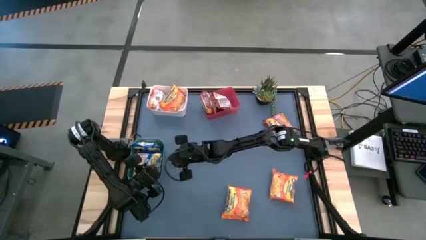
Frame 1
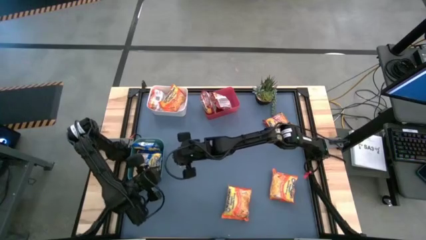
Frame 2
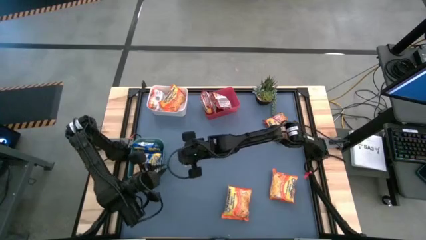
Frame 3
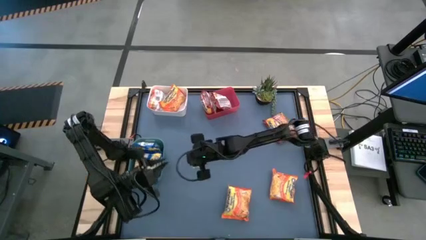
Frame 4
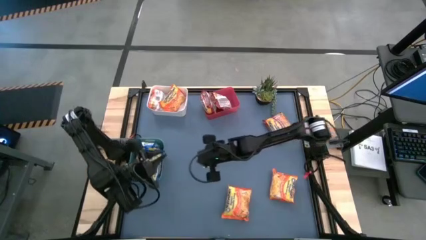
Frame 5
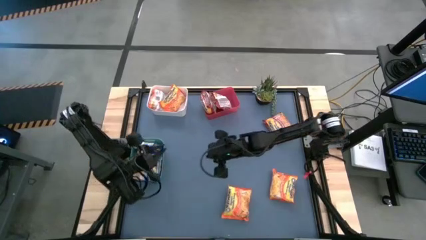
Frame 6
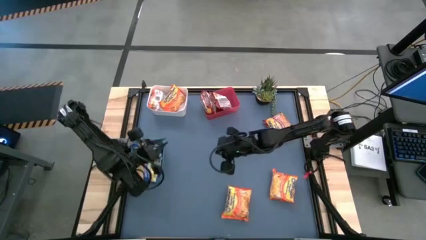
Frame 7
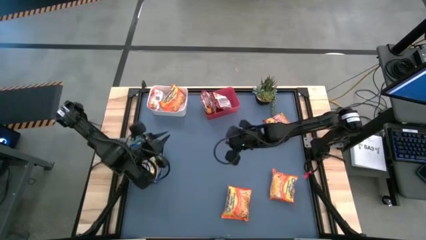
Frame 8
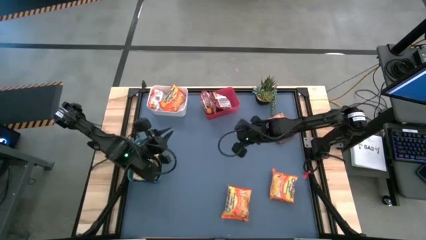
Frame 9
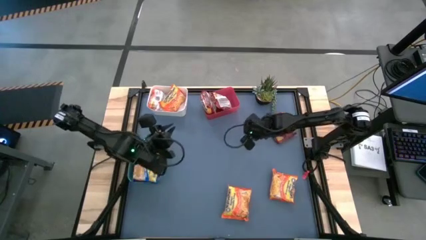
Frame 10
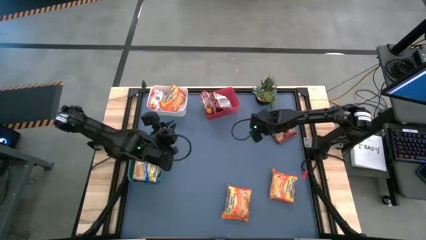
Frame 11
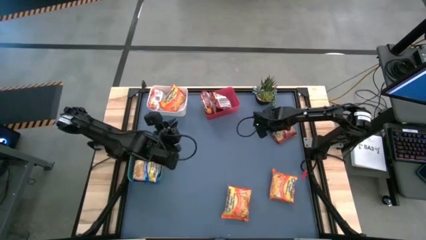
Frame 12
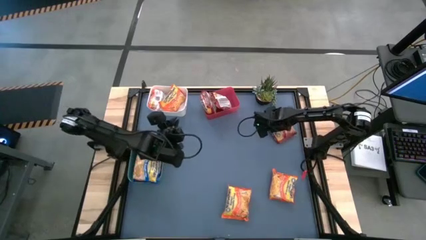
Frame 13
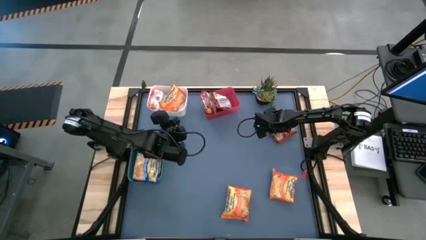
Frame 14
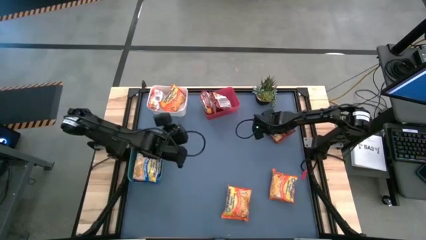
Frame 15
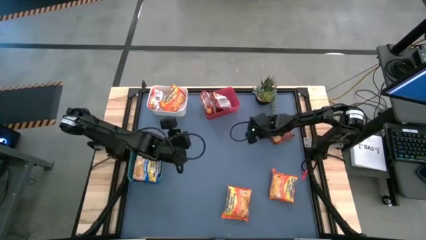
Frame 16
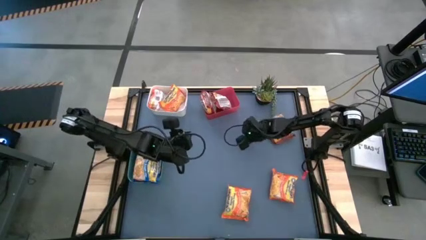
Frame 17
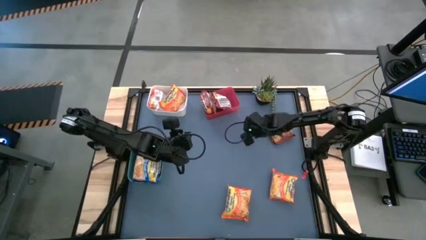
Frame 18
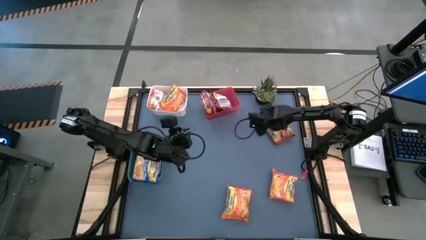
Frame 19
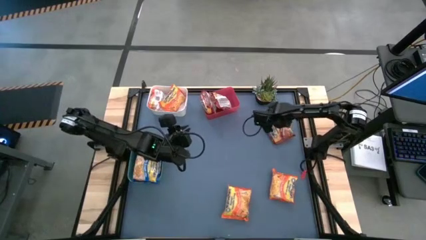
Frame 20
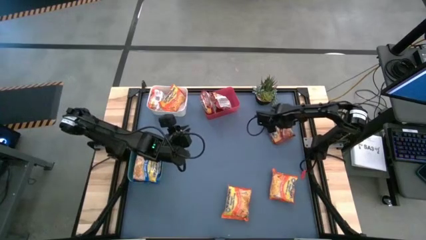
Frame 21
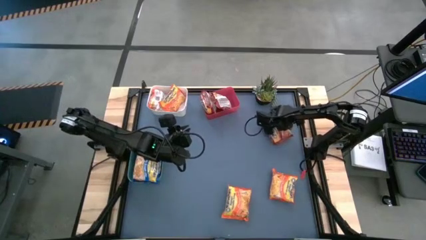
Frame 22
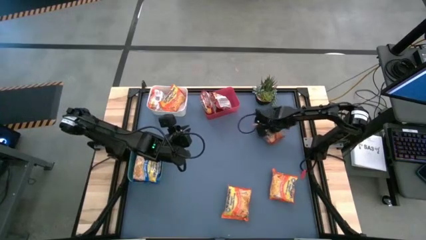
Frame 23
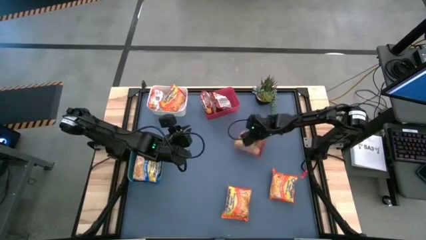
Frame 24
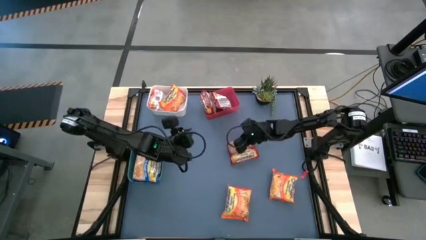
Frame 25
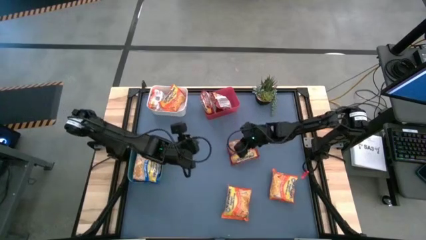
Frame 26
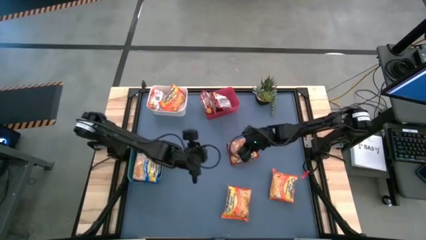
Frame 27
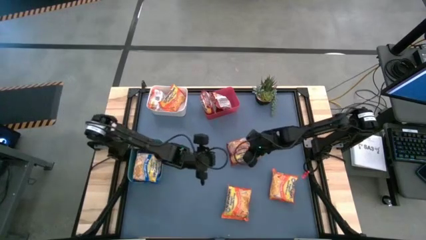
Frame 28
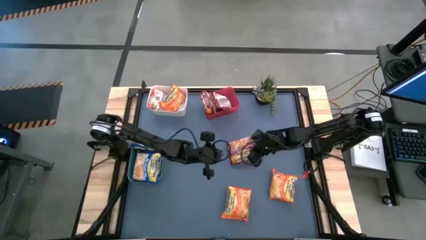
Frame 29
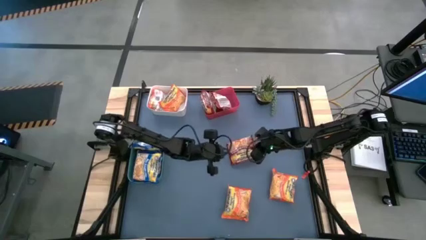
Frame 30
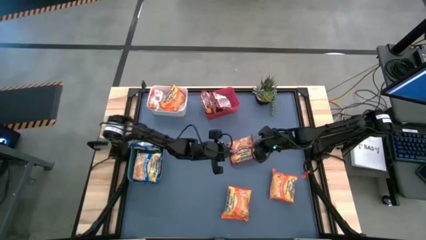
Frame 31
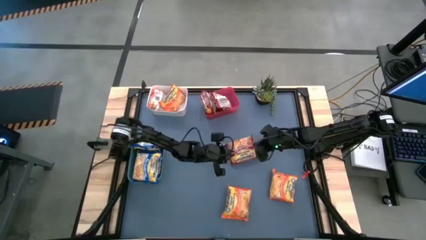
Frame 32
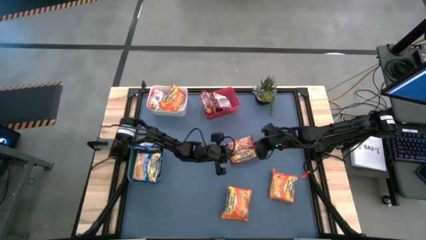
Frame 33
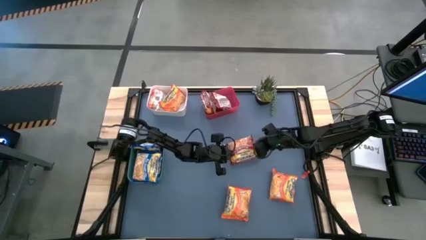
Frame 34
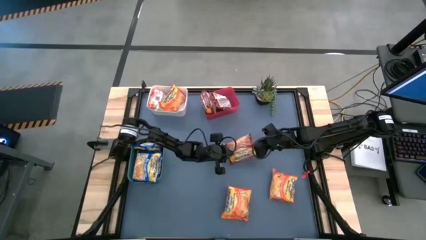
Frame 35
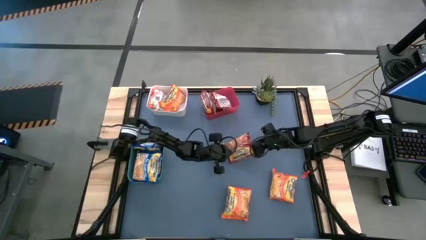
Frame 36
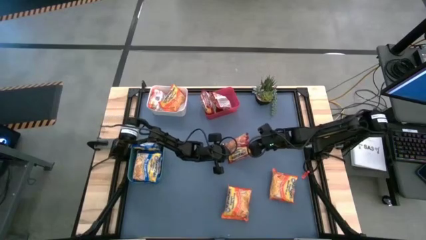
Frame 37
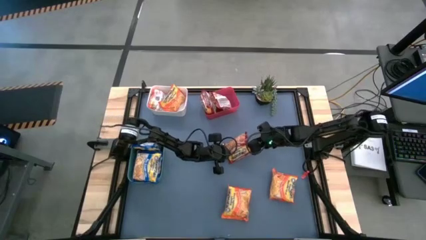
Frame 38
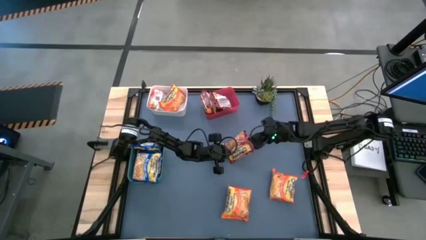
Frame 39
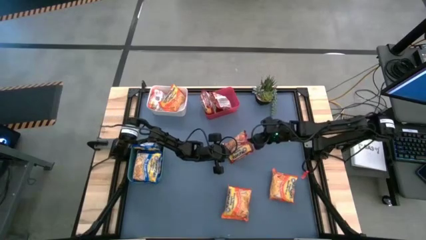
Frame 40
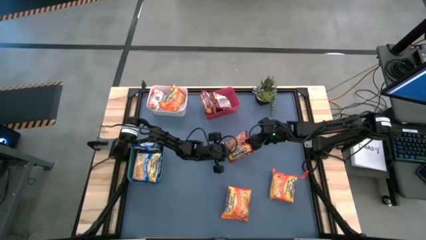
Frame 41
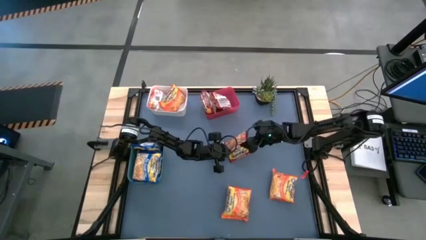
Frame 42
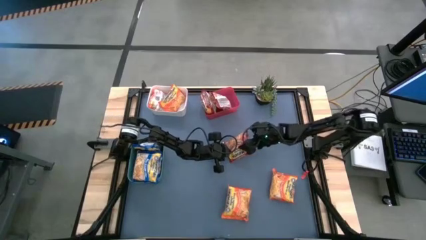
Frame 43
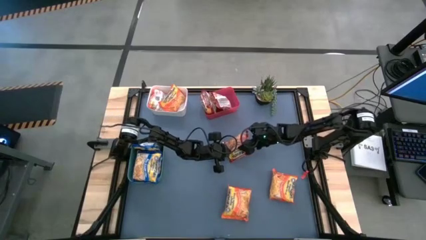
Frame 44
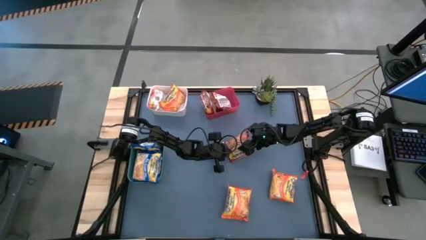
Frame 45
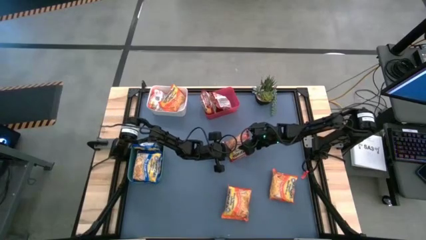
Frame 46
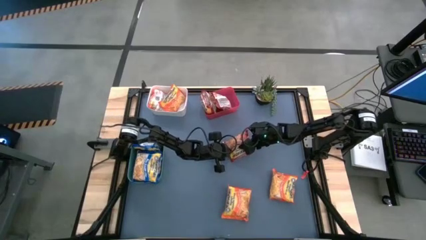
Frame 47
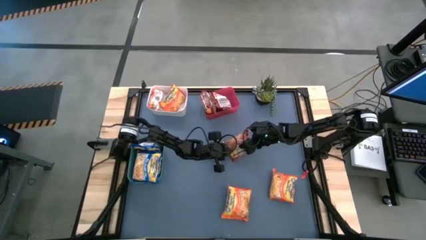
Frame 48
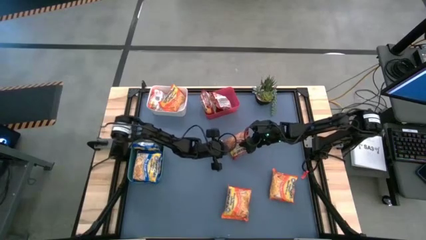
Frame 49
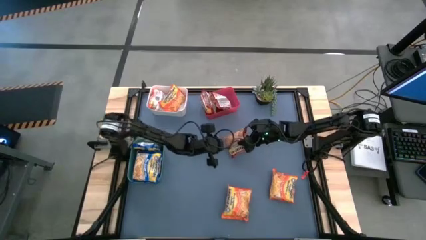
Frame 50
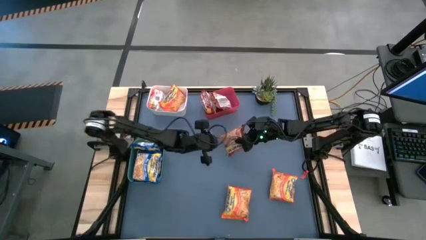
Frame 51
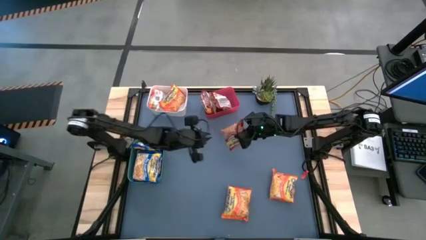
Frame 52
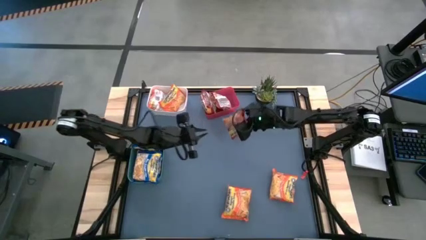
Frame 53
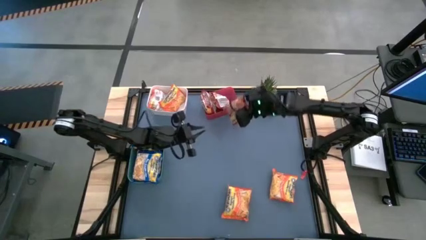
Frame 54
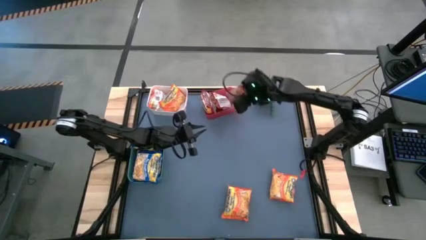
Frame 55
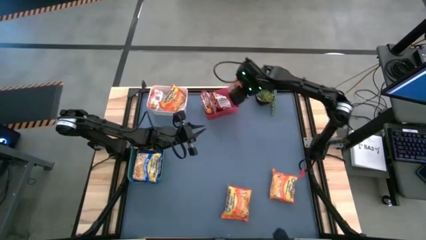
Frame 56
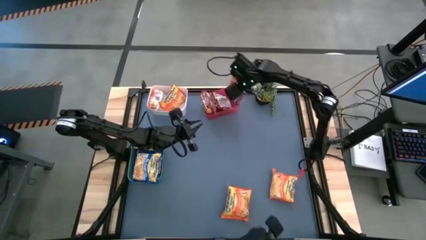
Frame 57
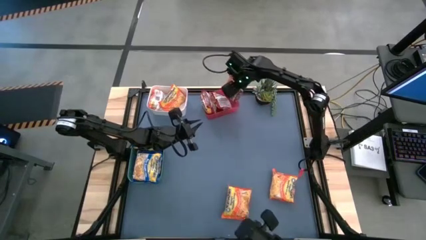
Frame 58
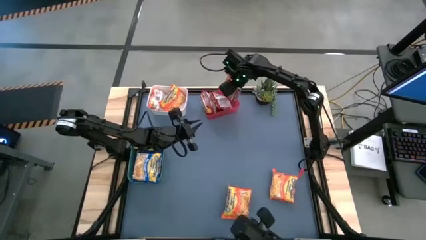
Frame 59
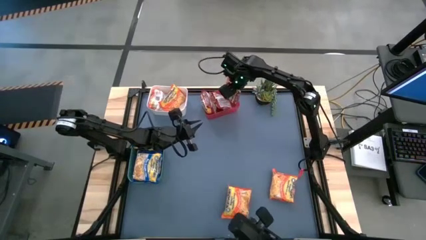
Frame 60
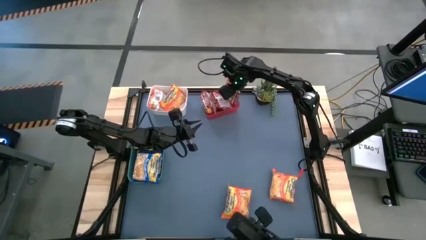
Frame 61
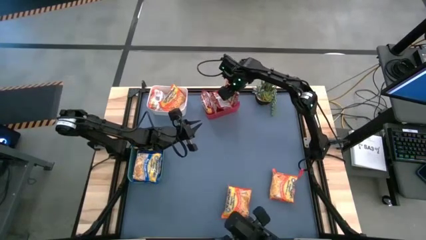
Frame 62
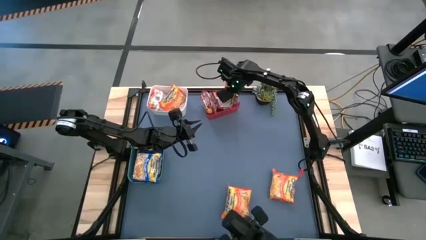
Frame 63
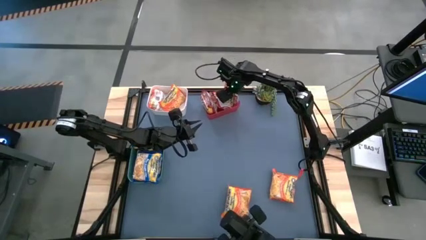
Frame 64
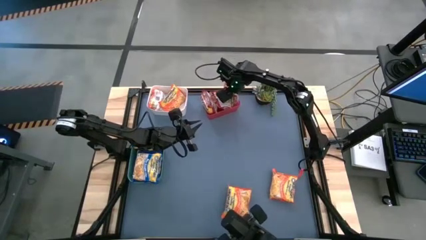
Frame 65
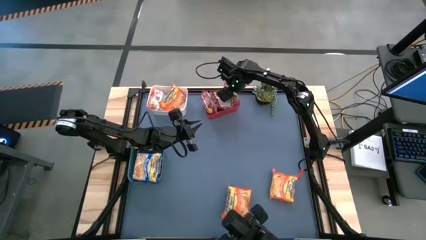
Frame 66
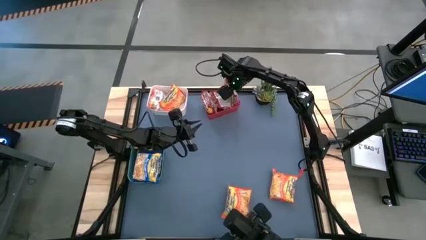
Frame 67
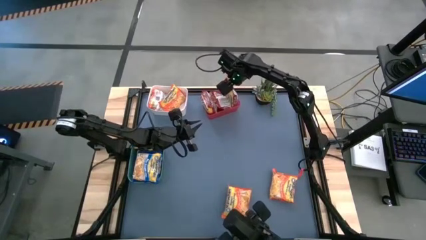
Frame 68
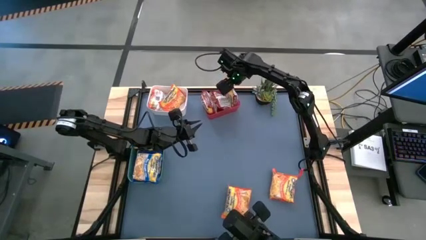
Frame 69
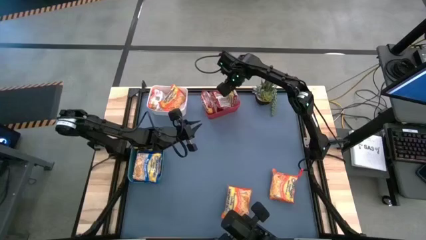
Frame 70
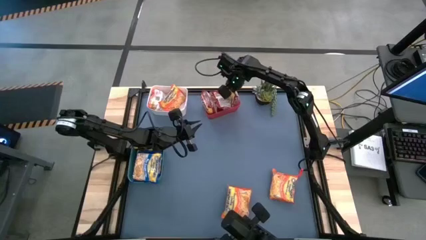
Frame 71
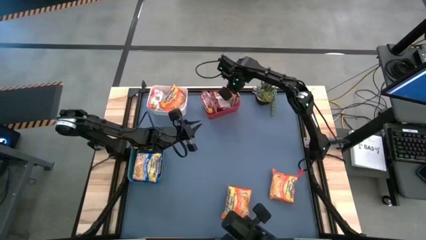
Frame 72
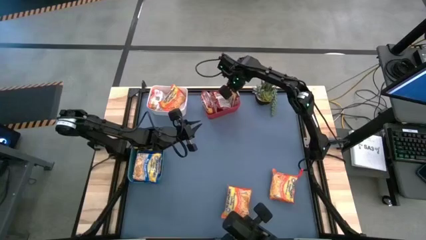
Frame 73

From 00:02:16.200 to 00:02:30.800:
Task: Sort Maruchan noodles
Put the red noodle pack into the red bin
